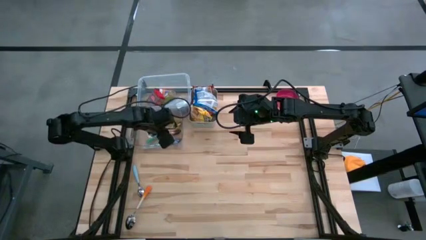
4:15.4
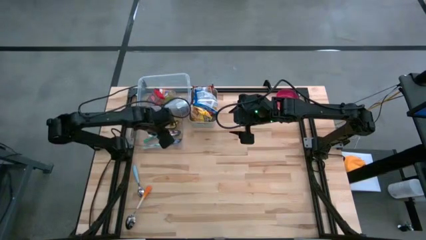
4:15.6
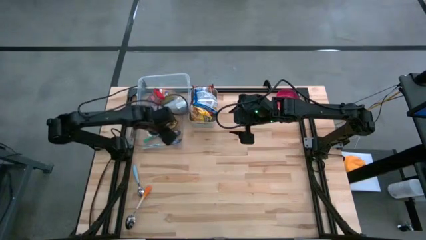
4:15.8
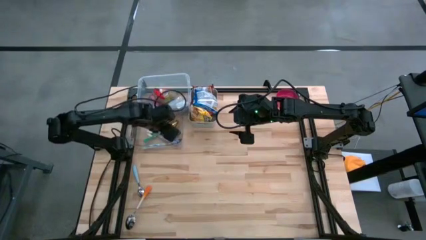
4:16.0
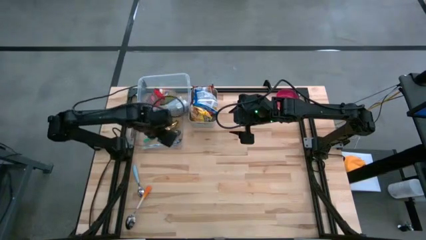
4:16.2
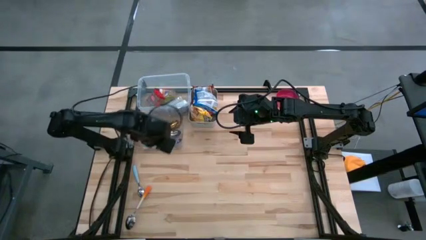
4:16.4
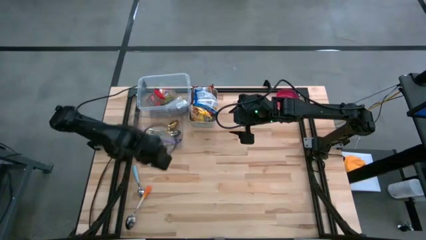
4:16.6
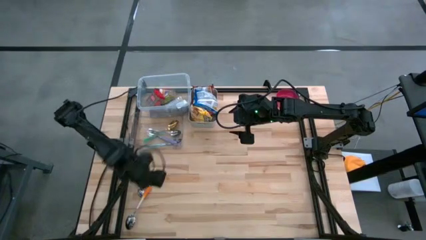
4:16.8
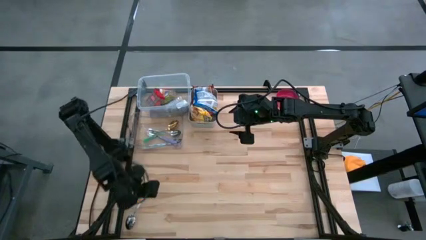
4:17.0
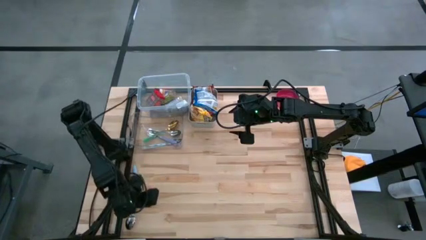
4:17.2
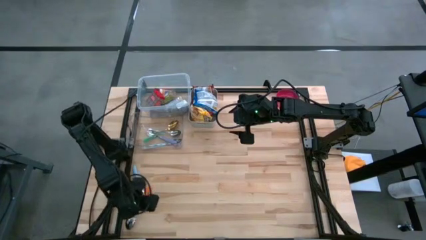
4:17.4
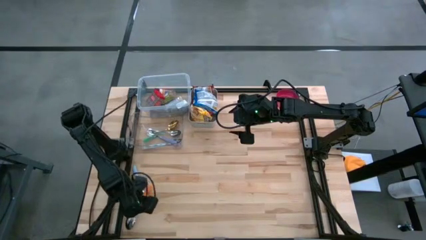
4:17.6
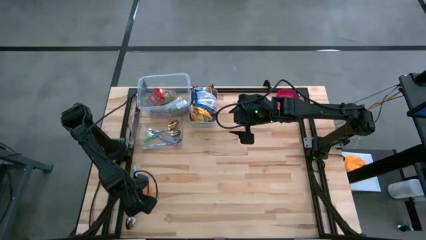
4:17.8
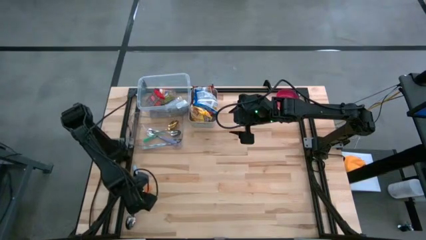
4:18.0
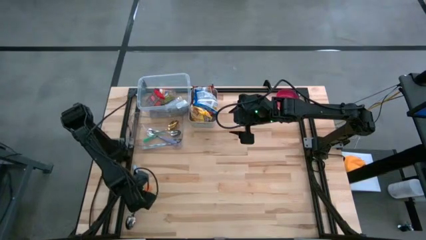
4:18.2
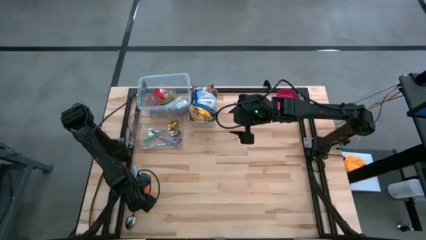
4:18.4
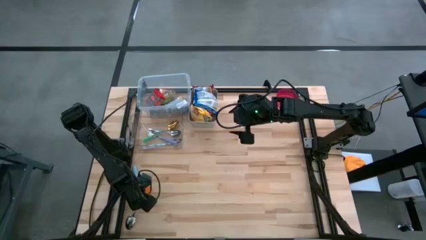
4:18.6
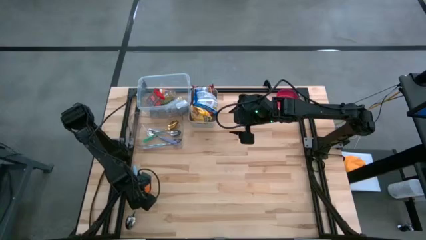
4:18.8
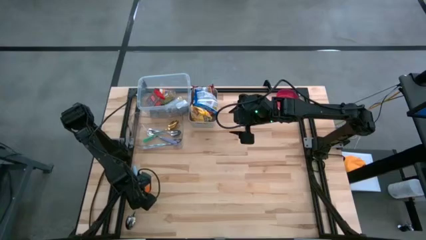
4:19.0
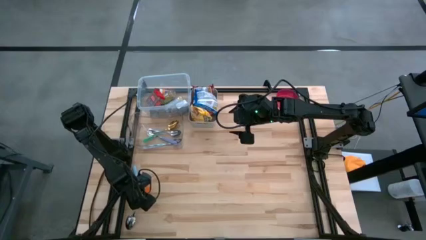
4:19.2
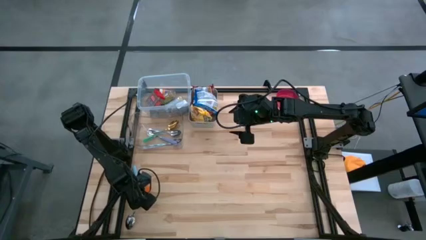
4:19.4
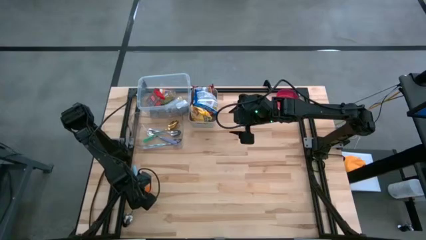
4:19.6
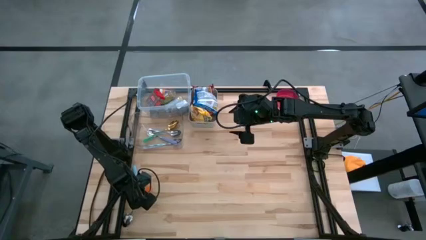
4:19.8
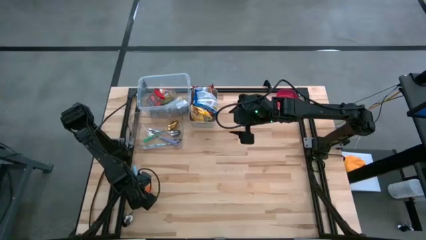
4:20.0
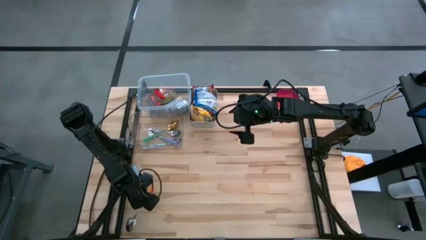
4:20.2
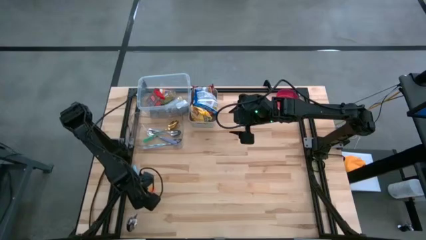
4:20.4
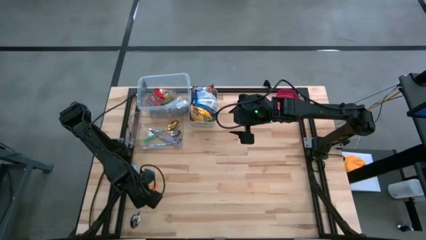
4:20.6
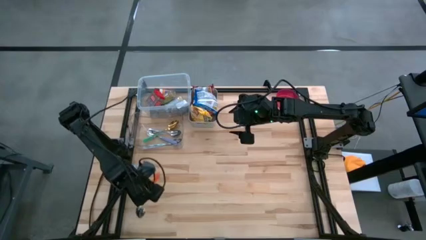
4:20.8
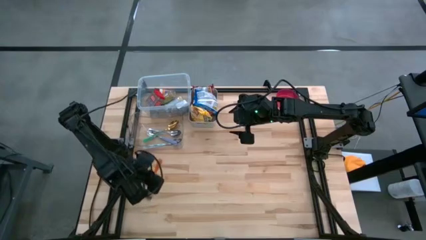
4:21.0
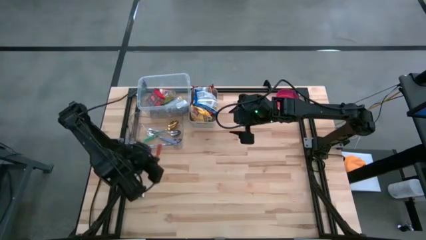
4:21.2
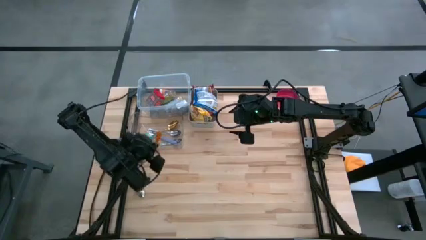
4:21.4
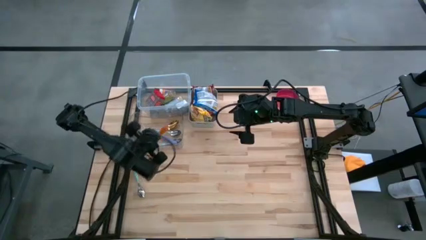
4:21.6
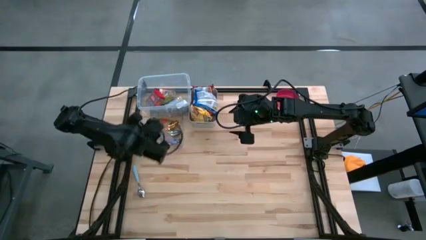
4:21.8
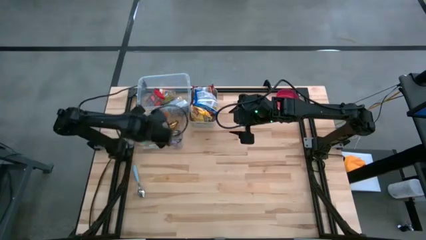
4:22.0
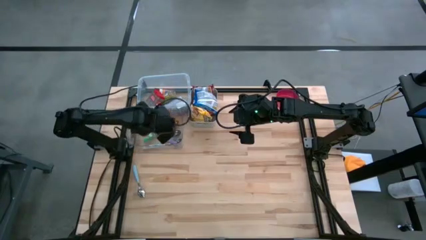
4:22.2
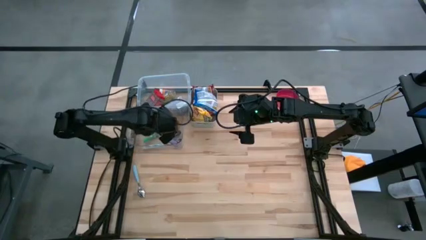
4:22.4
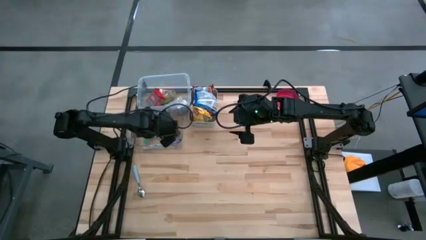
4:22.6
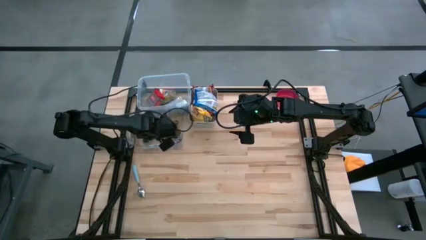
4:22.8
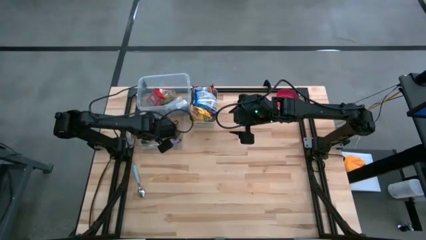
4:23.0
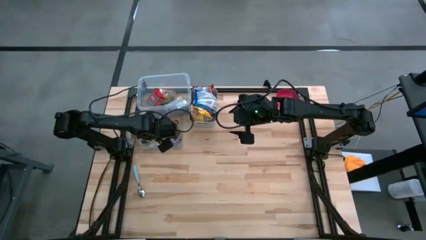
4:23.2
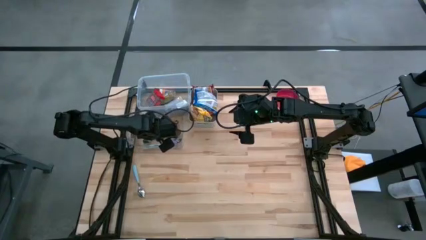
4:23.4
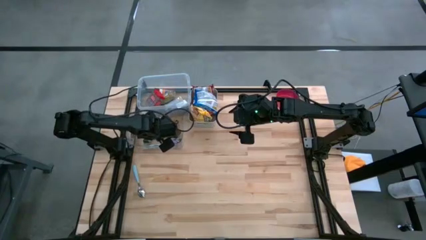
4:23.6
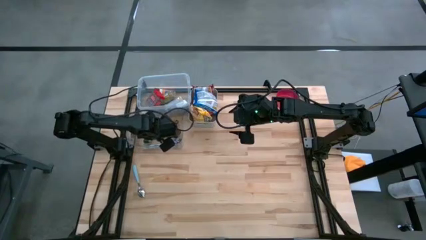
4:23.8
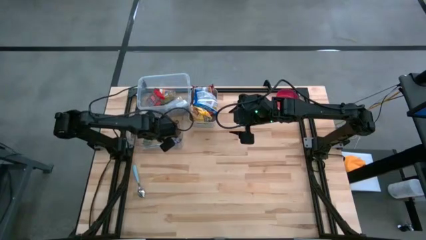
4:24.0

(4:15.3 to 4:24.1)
Put the orange spoon into the transparent bin

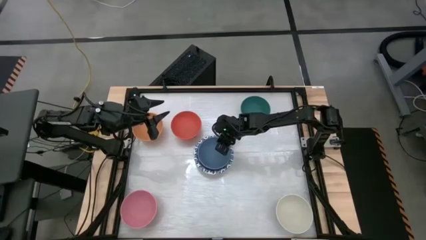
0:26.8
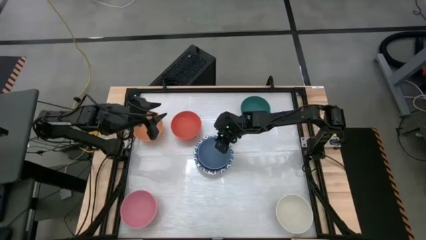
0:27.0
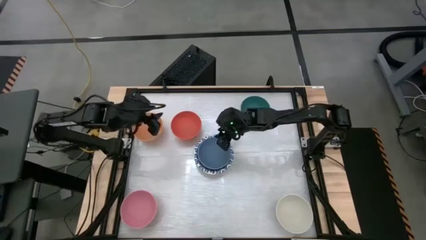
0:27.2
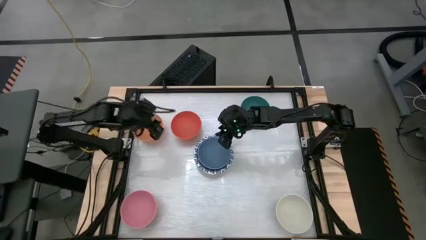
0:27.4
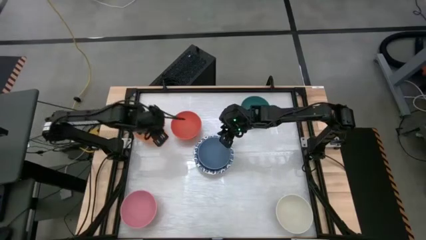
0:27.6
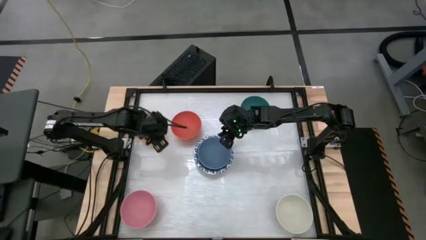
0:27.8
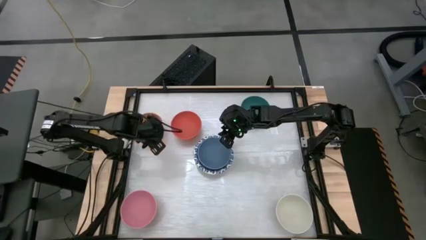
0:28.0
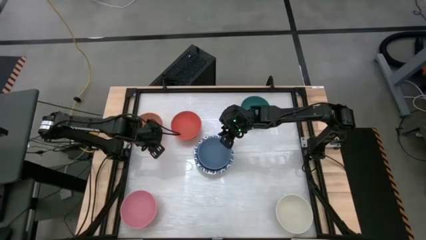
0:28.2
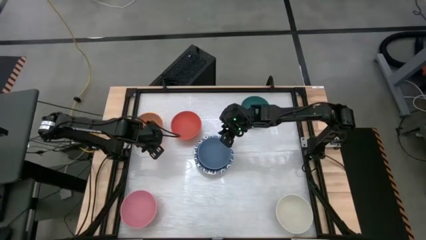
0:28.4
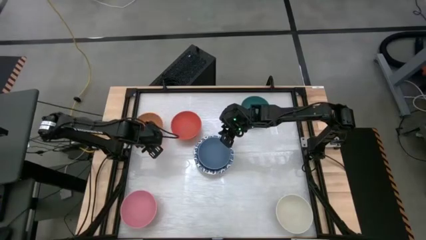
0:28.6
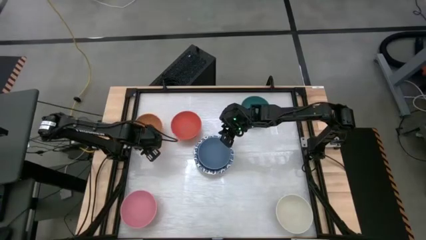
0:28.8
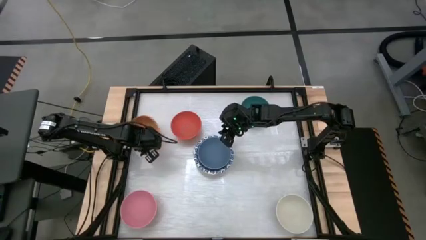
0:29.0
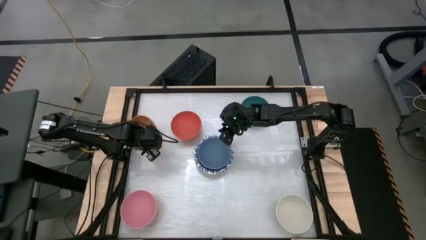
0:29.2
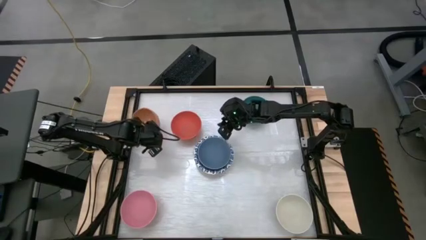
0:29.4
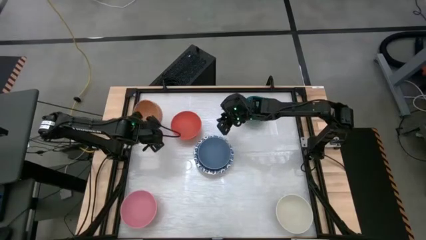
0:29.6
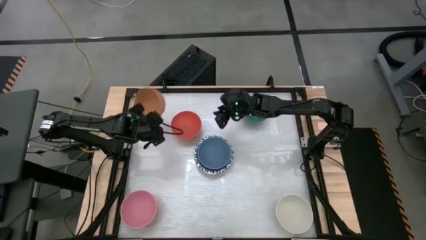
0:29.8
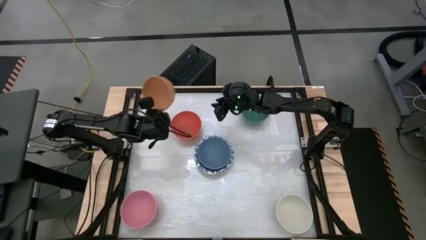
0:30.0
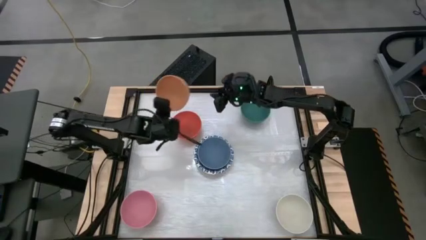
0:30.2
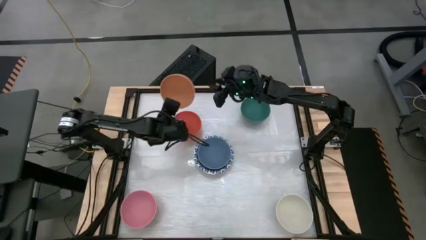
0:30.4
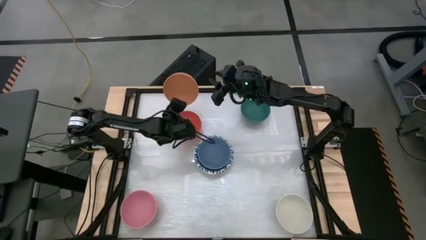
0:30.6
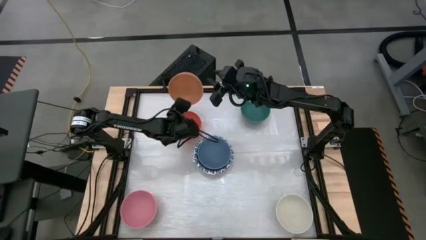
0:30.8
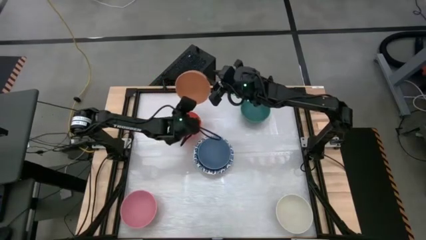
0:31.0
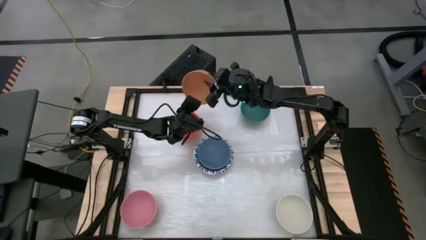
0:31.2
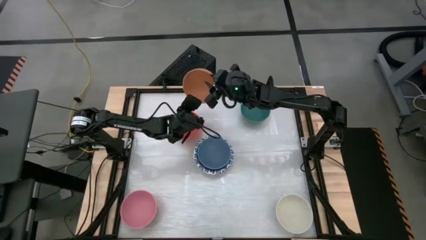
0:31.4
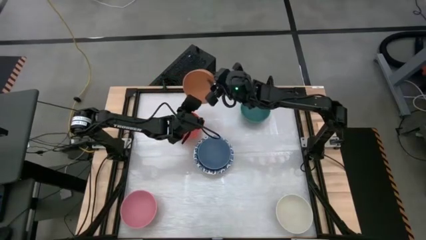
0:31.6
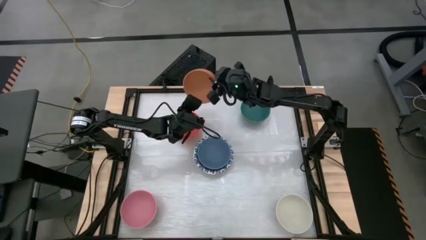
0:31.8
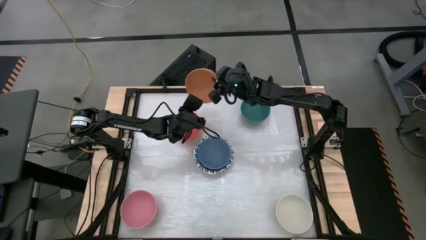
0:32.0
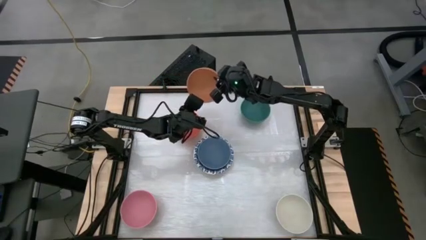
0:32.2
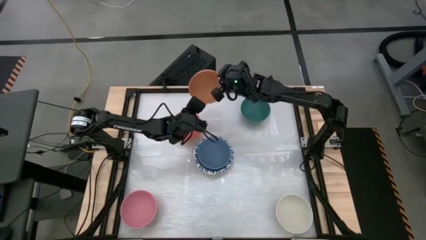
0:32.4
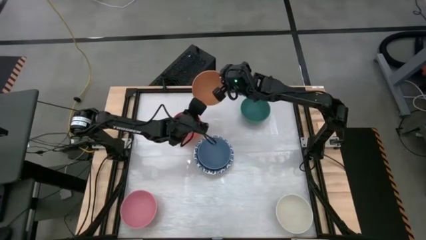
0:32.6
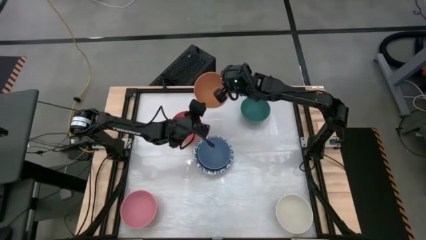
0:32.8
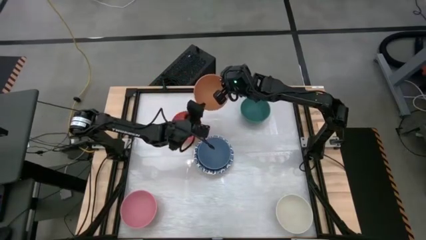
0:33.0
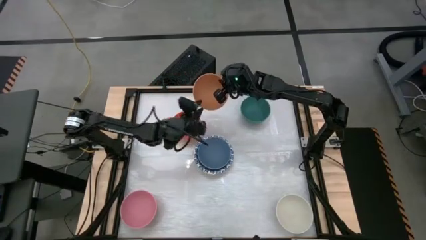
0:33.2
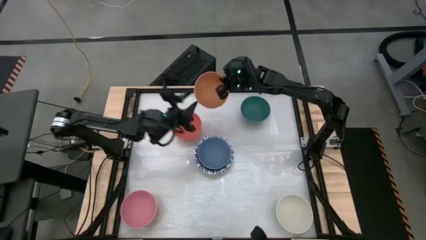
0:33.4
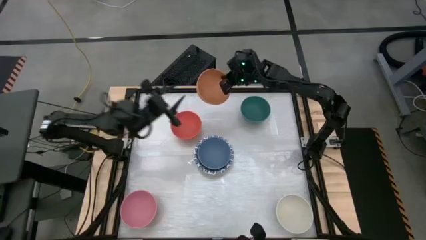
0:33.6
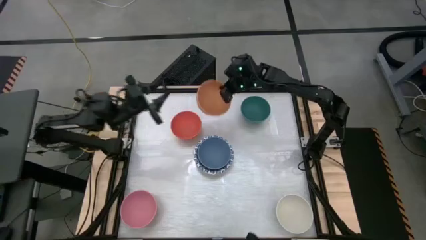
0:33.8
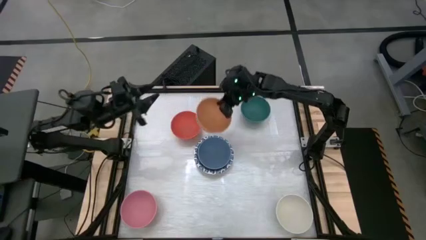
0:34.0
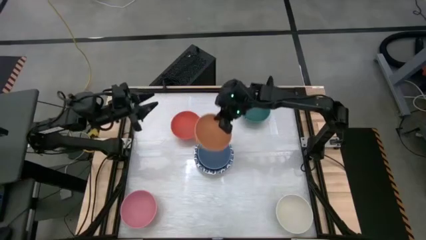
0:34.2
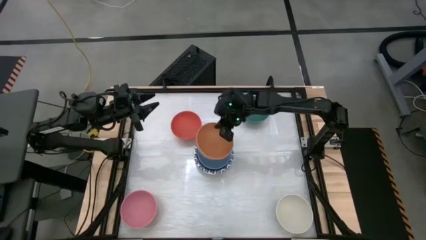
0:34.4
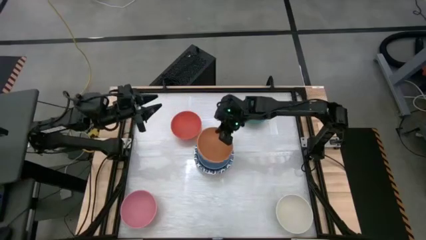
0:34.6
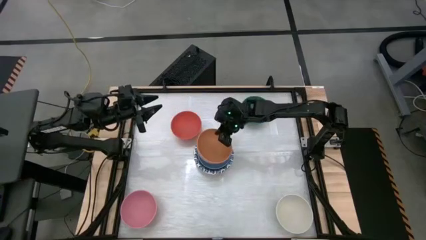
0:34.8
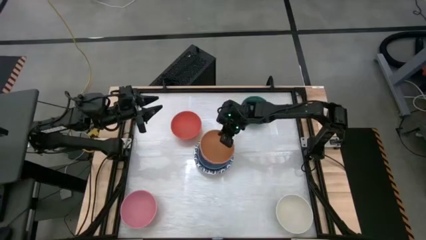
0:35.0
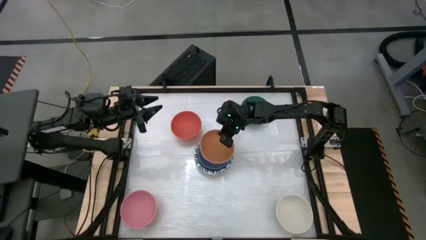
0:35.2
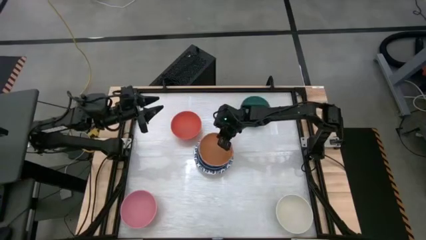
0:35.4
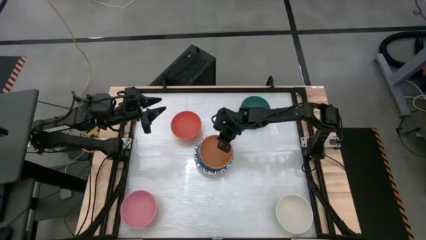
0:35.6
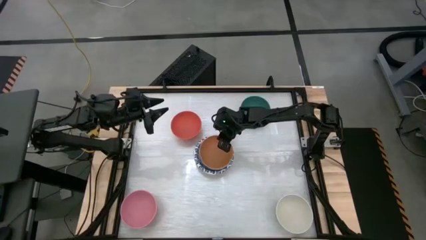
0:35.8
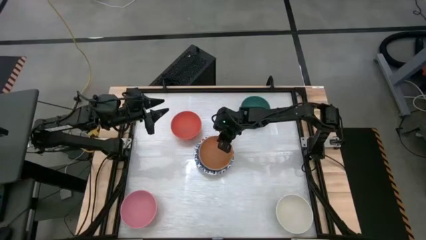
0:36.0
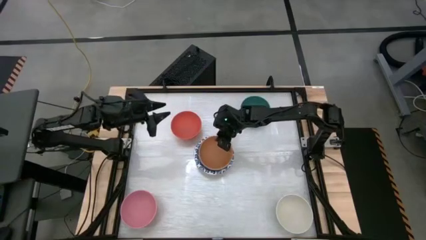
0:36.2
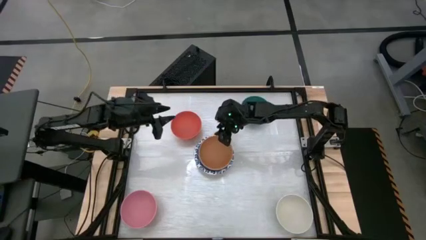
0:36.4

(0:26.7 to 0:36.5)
Stack the brown bowl on top of the blue bowl
